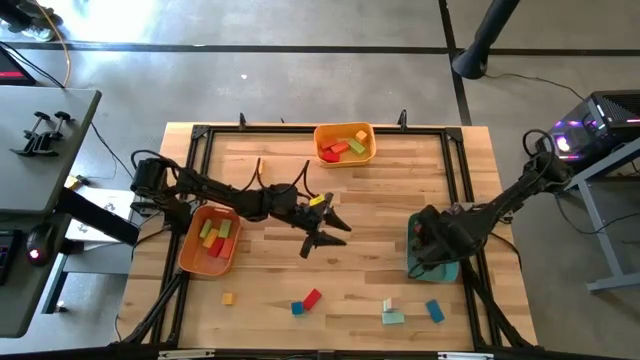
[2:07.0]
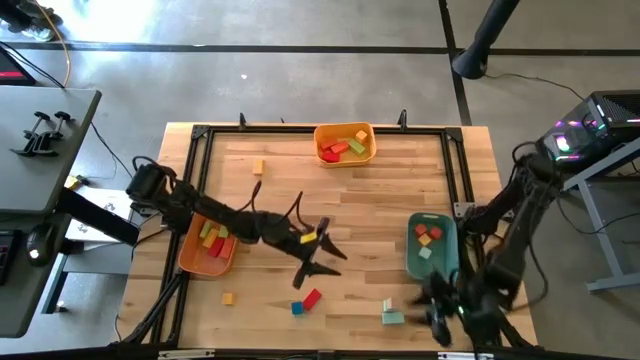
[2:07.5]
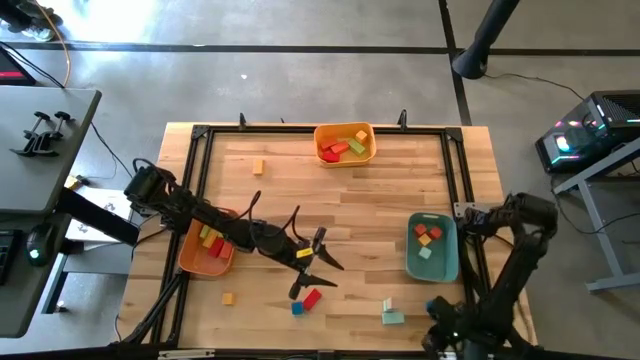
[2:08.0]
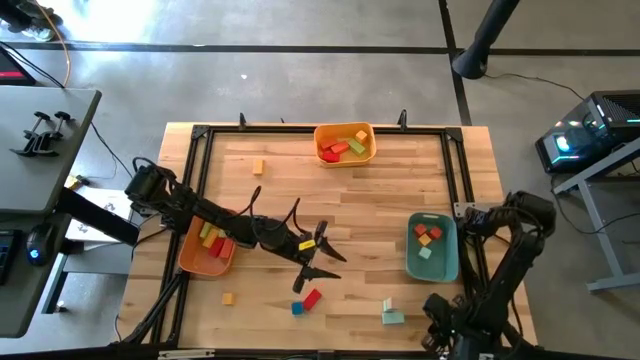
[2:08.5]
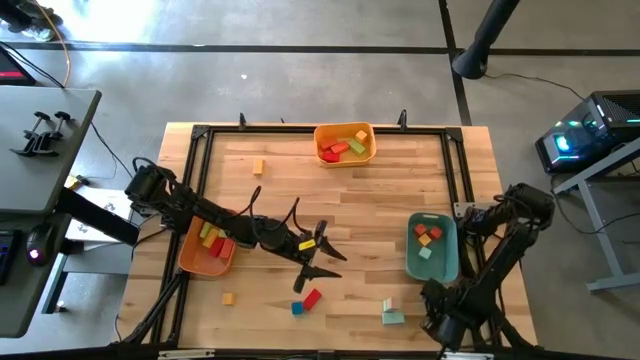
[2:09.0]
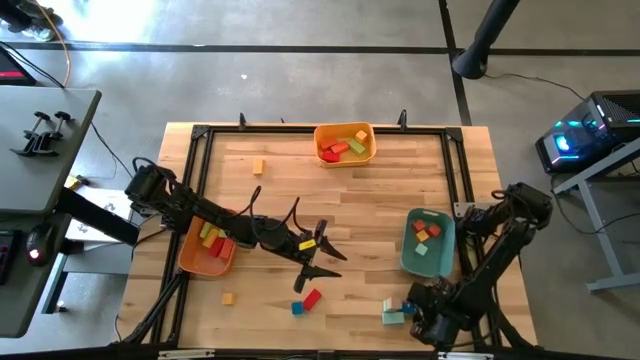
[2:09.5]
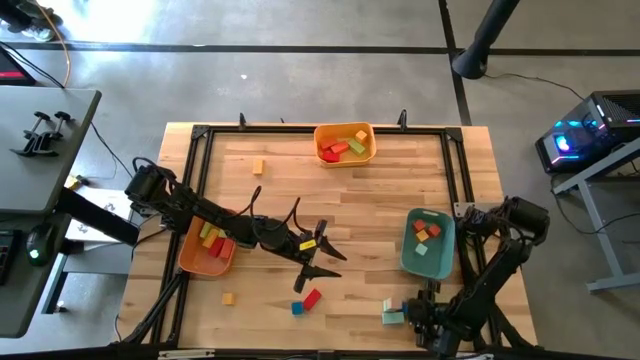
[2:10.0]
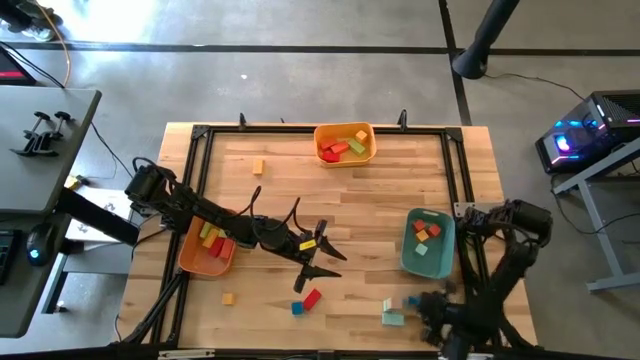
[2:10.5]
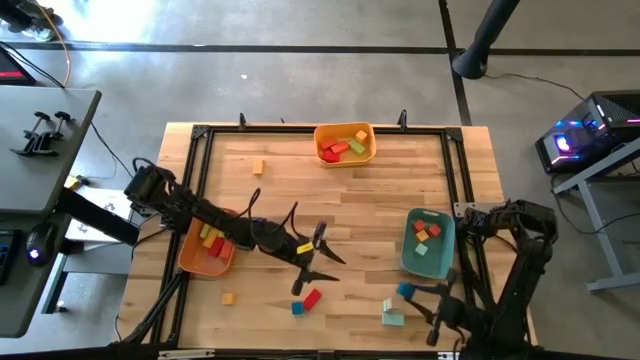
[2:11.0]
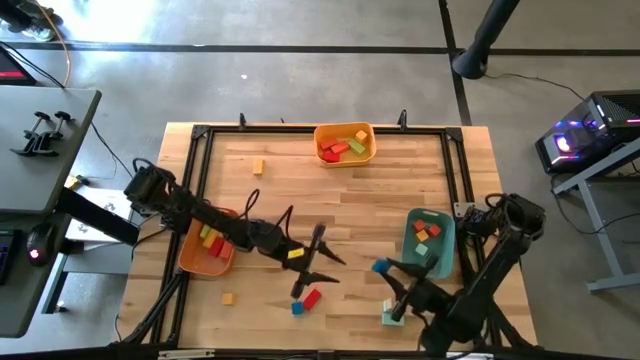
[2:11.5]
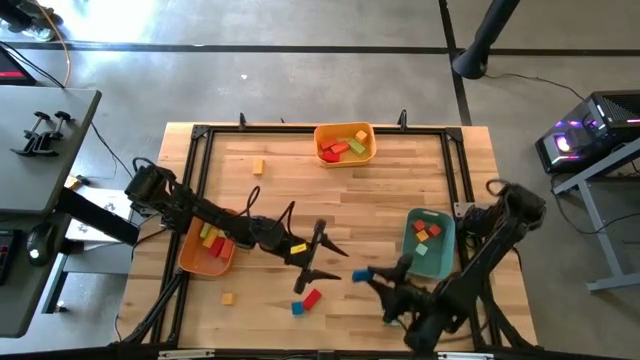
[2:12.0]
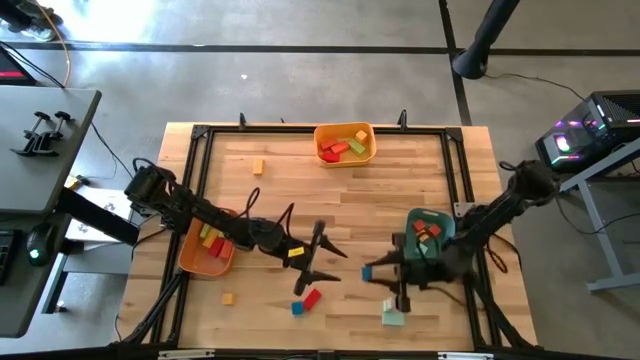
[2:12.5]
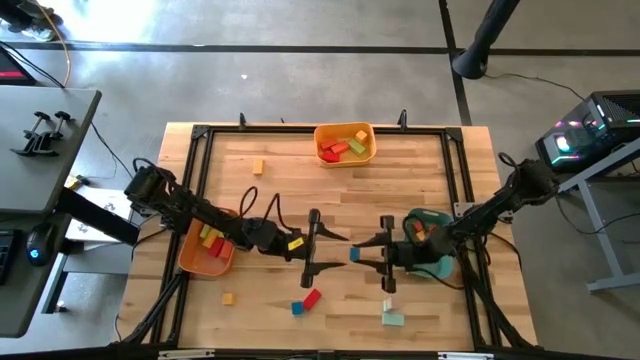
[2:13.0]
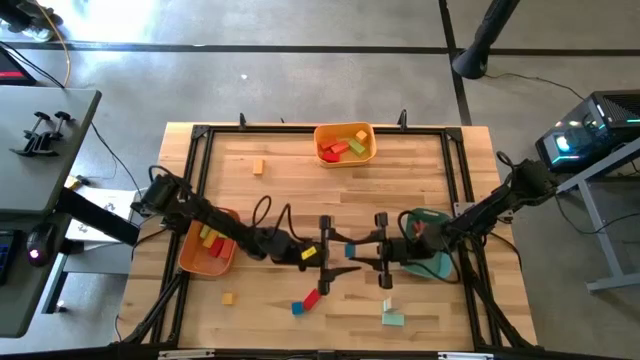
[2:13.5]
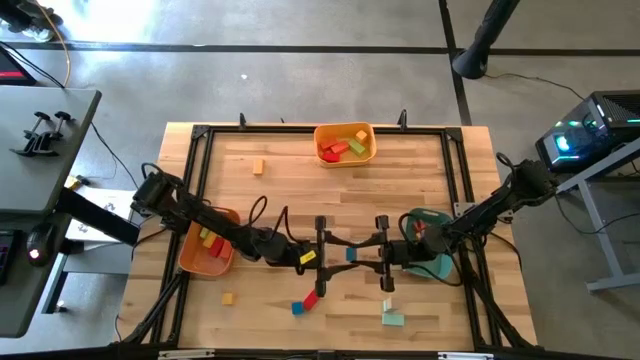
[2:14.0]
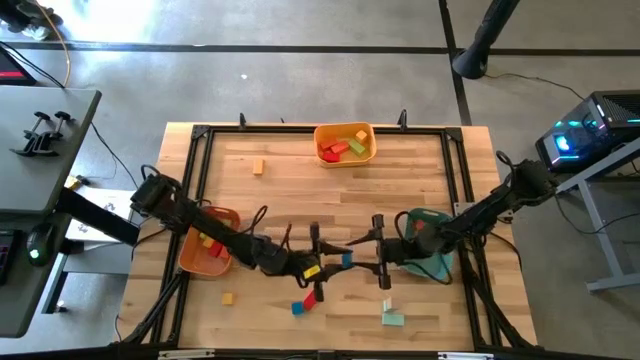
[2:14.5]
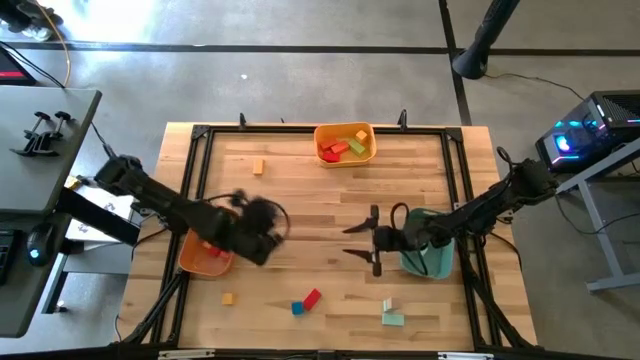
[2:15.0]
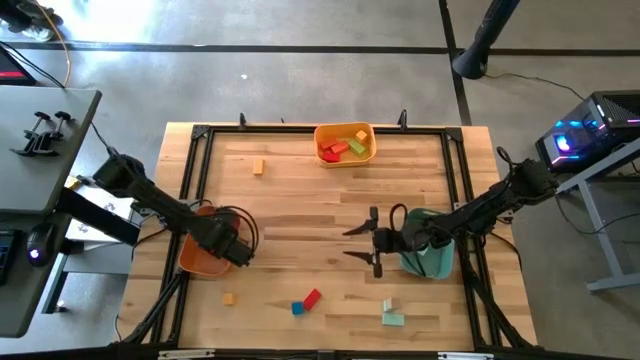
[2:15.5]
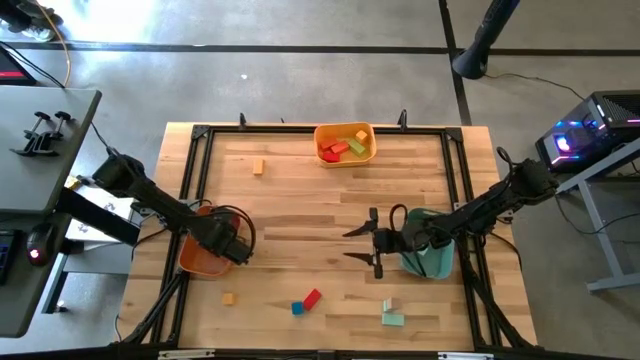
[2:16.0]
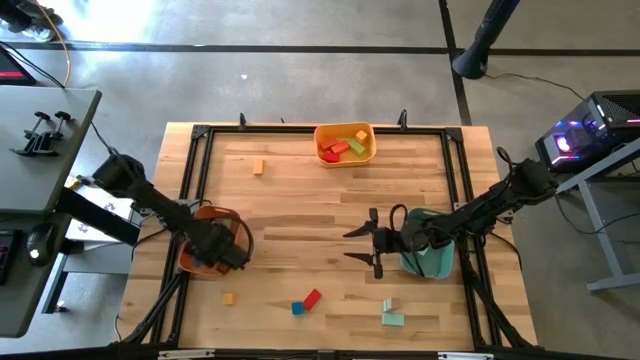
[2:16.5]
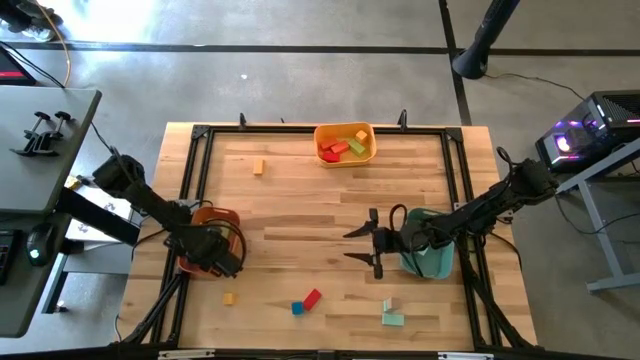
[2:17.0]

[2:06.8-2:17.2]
Task: Sort blocks by size
Put the blue medium block into the orange bin

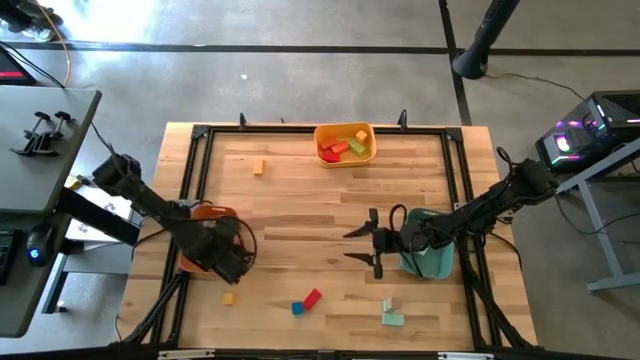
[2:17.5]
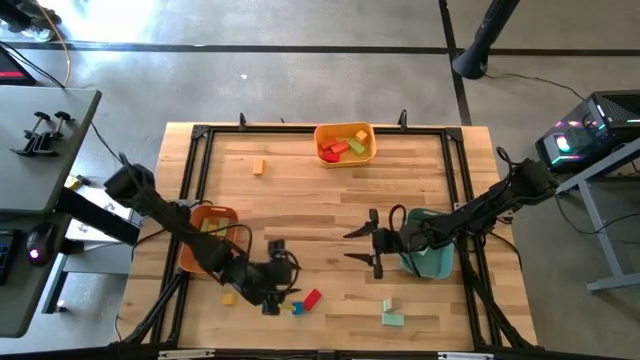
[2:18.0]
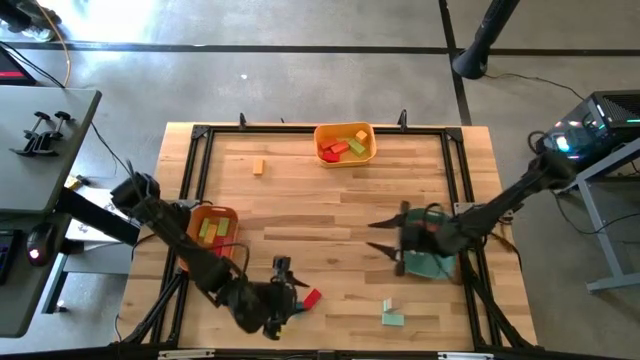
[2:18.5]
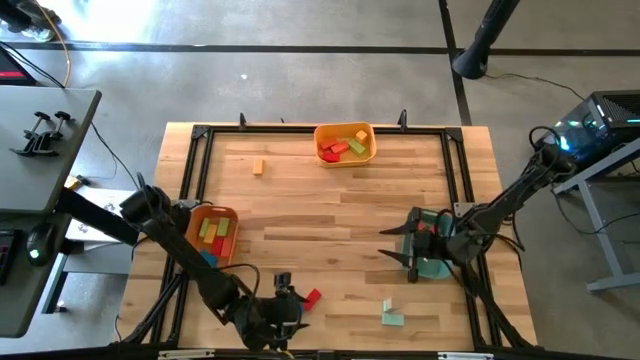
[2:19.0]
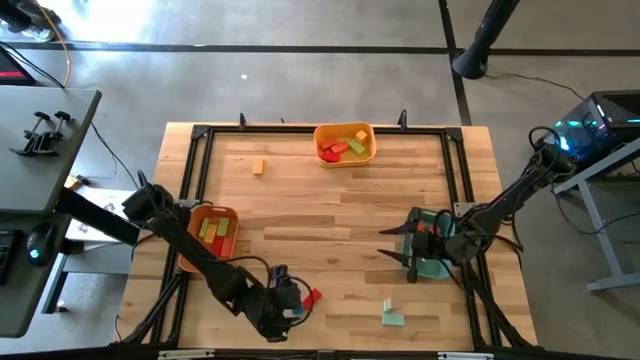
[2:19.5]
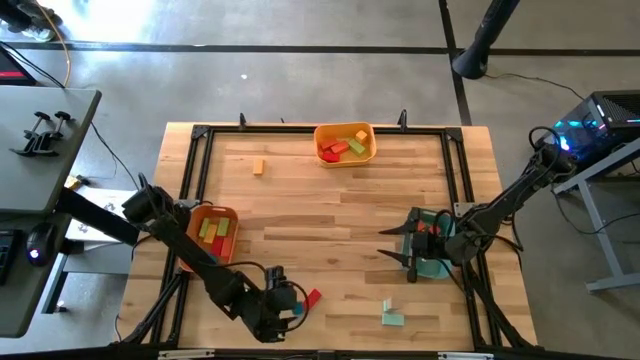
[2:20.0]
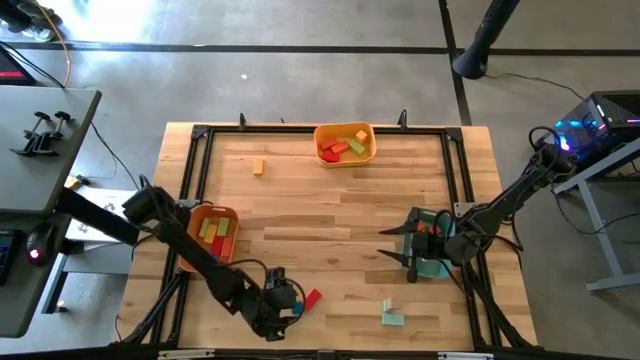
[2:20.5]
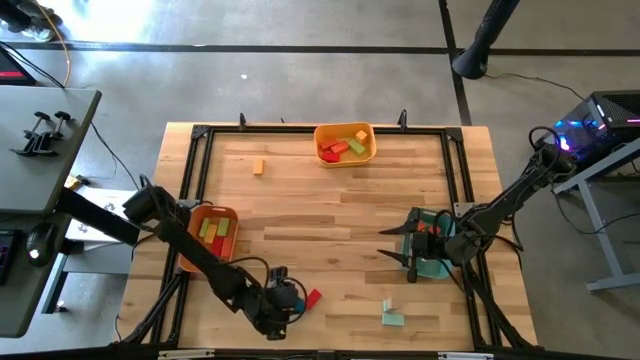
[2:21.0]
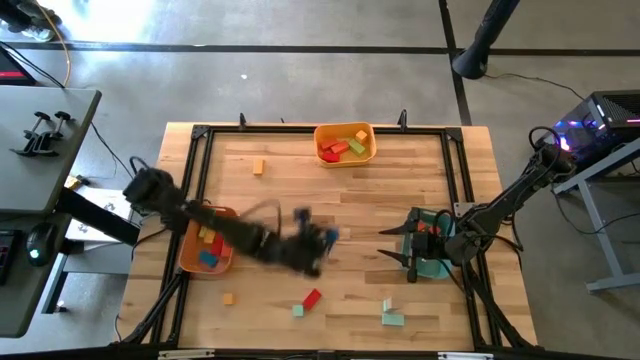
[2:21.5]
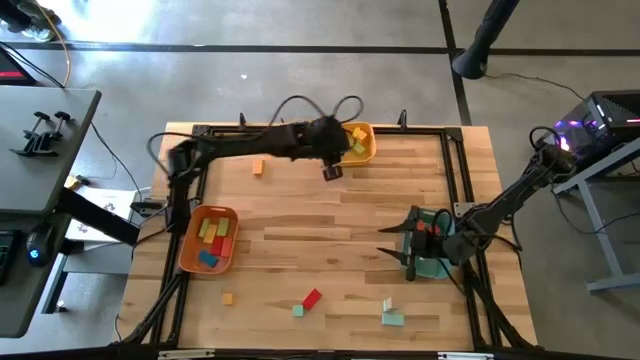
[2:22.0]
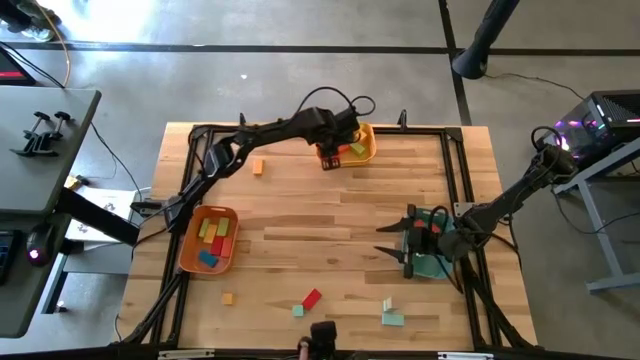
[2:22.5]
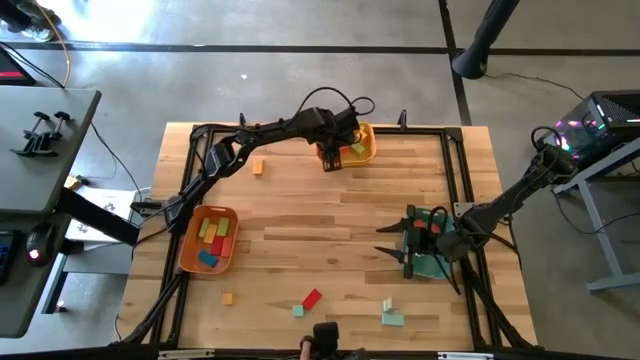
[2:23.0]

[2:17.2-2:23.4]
Put the blue large block into the yellow bin

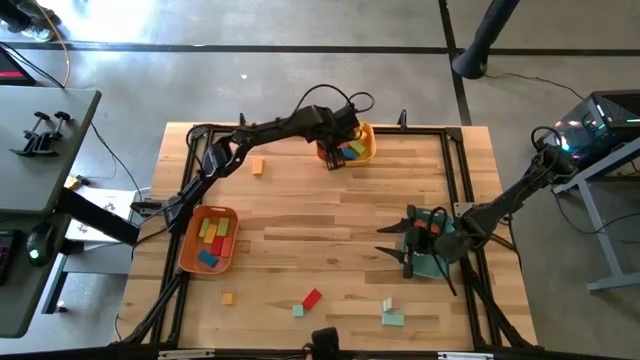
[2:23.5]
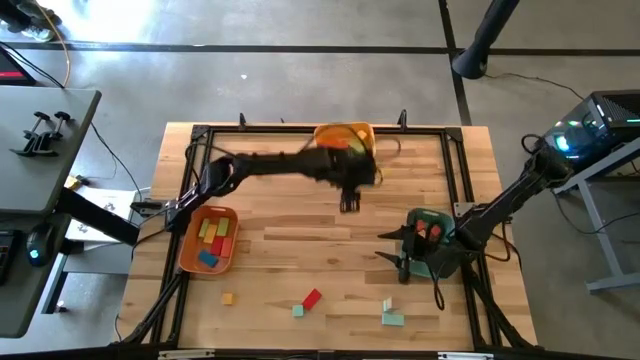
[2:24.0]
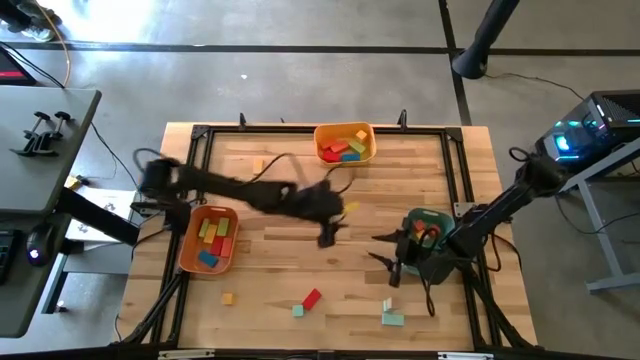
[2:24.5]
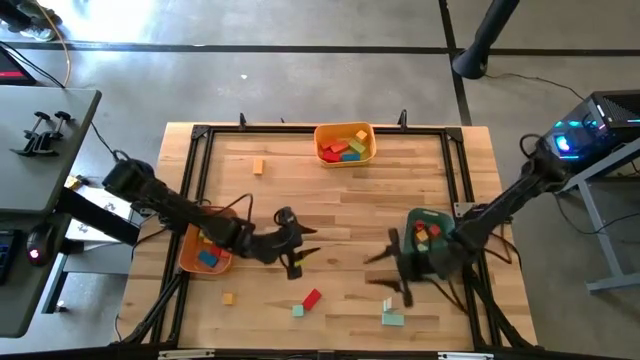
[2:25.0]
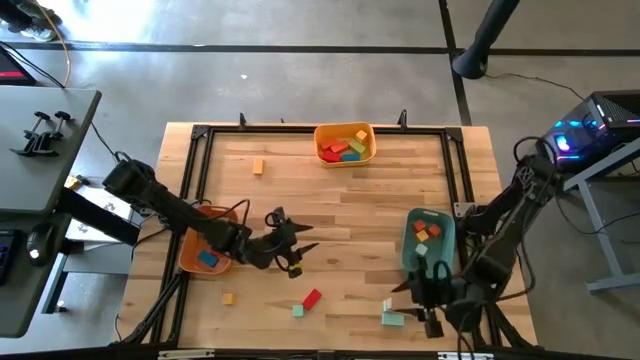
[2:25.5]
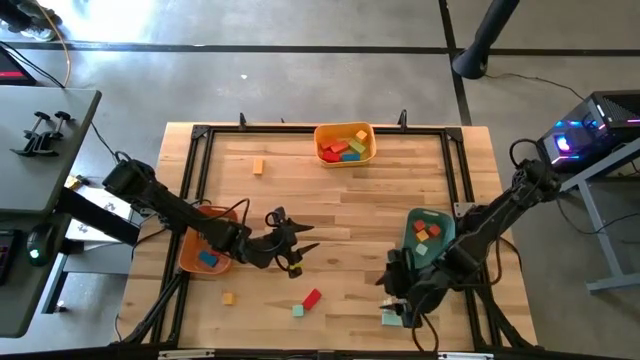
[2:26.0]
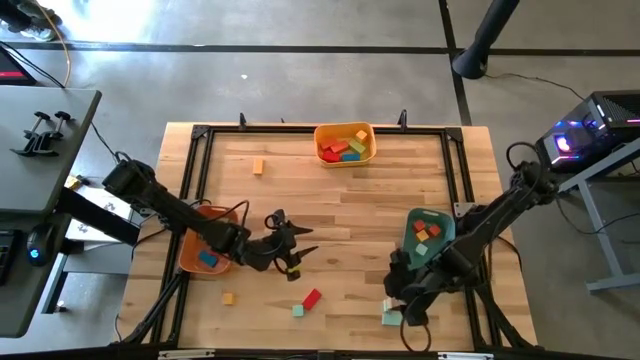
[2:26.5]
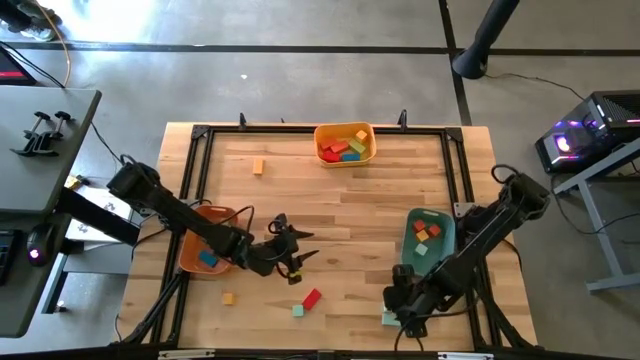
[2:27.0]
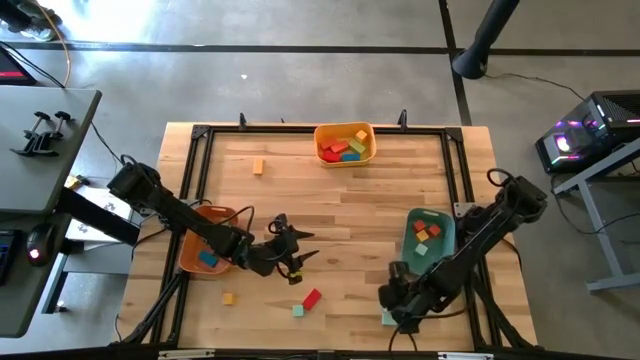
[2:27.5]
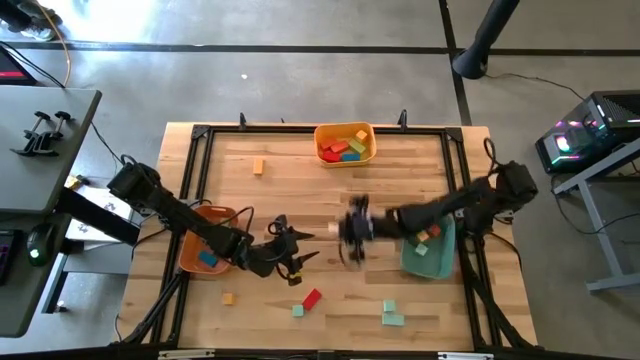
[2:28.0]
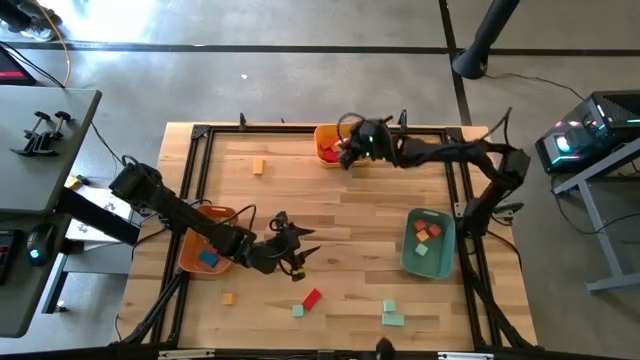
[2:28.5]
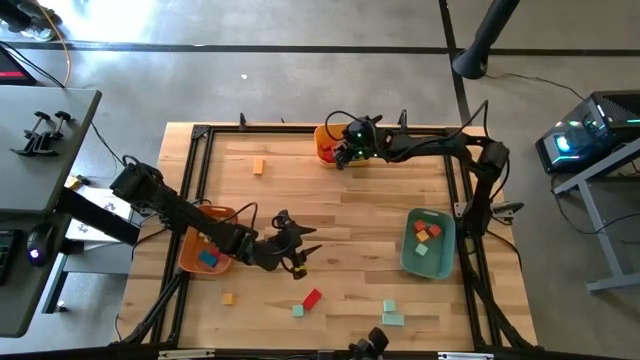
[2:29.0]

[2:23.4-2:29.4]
Put the brown large block into the yellow bin
